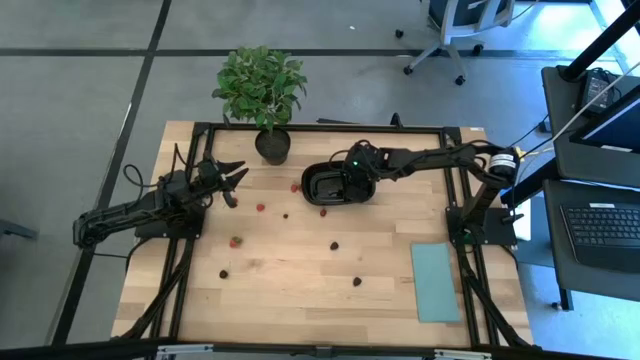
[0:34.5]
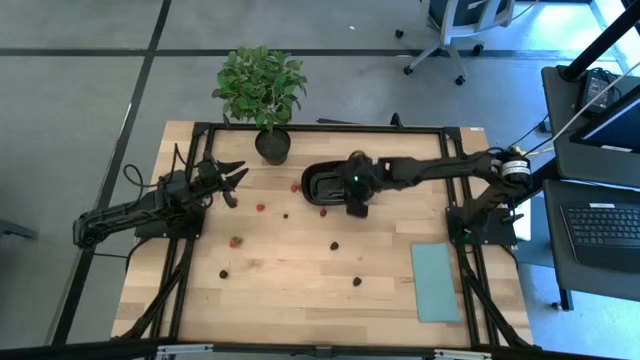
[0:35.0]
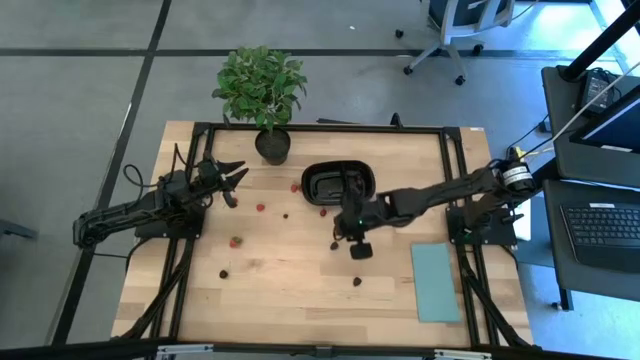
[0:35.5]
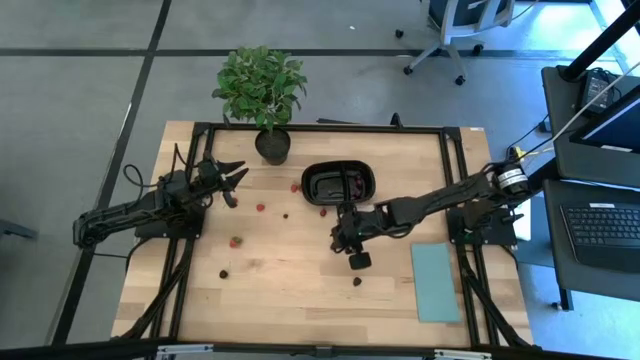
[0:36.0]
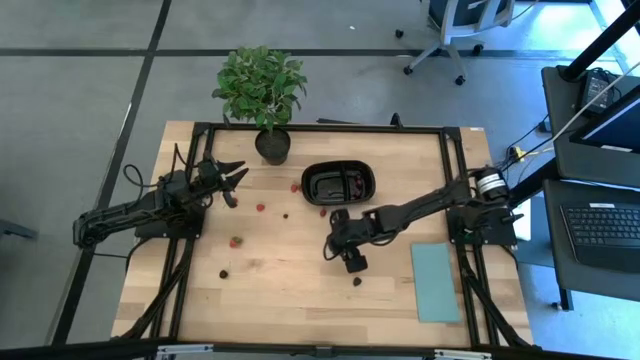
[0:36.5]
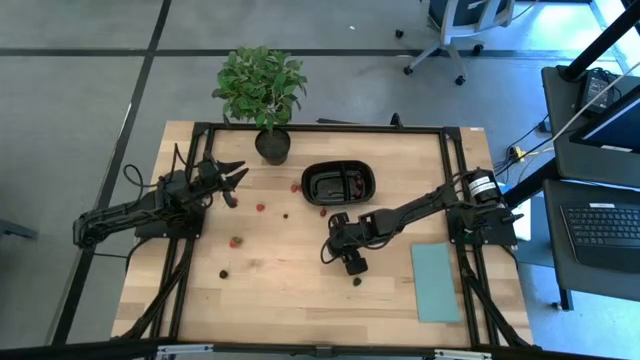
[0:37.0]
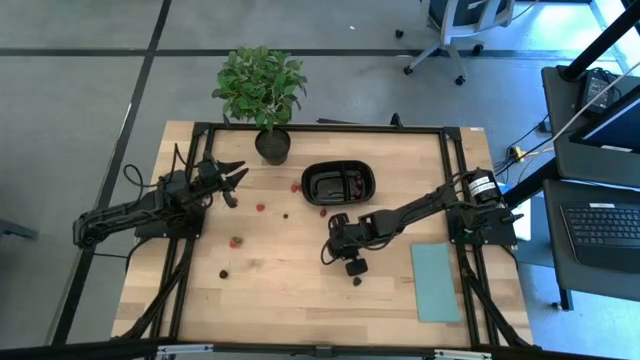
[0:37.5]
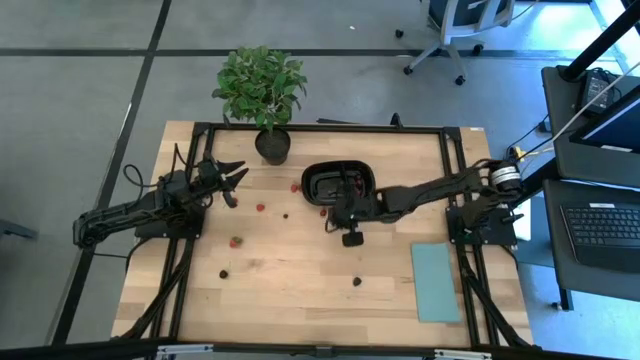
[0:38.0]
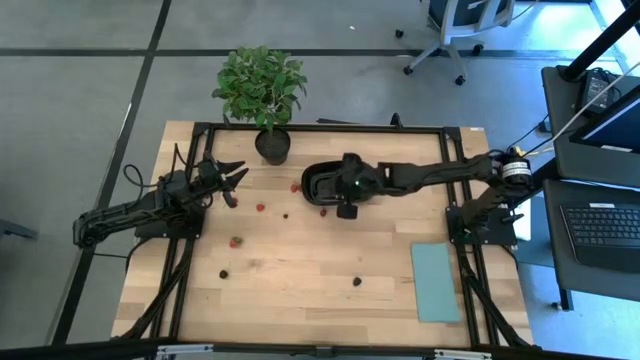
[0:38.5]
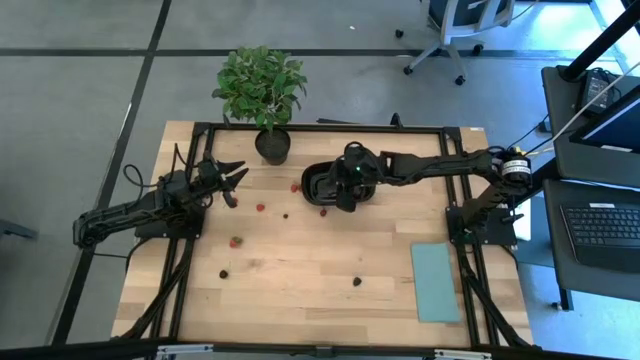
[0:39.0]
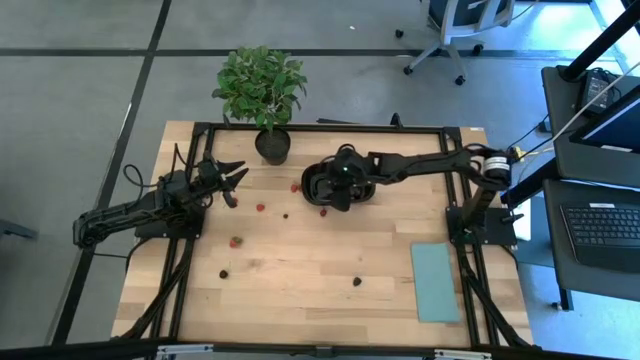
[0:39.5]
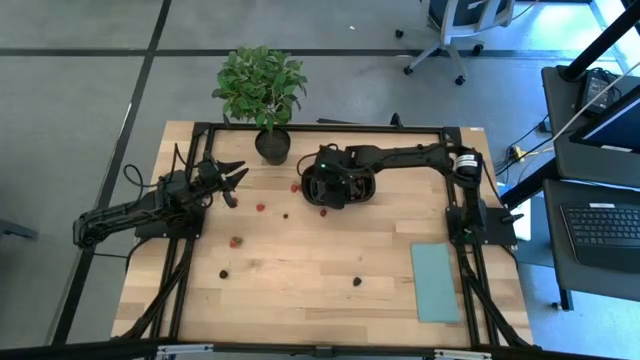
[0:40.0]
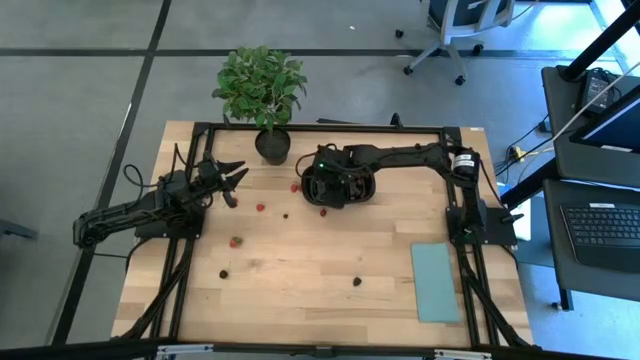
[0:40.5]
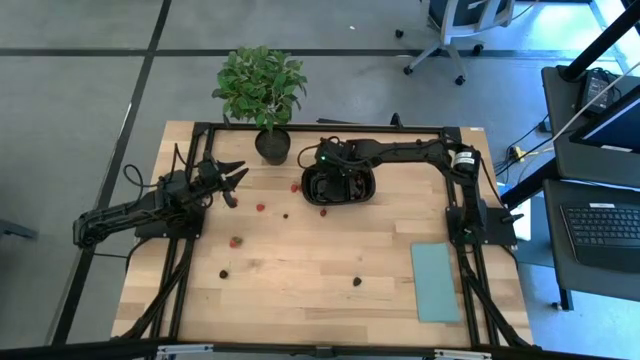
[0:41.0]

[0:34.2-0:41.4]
Task: Pick and placing Produce into tupperware
Put the top blackberry into the black container

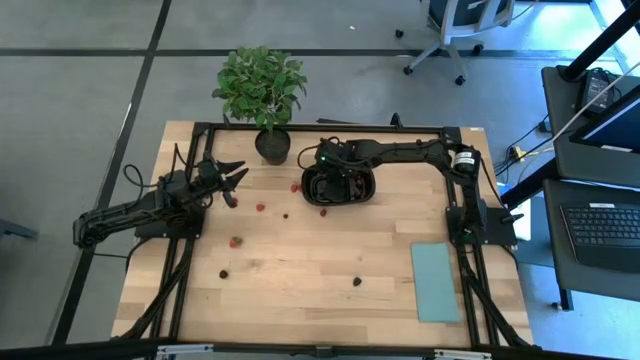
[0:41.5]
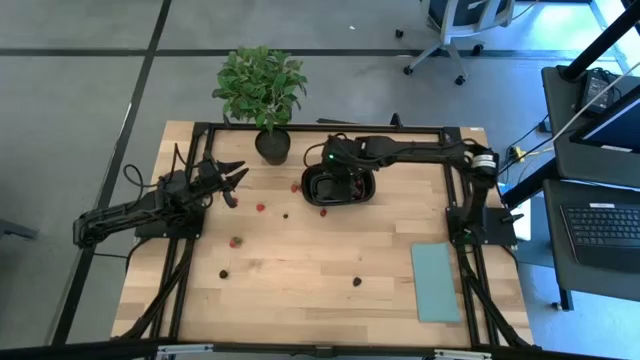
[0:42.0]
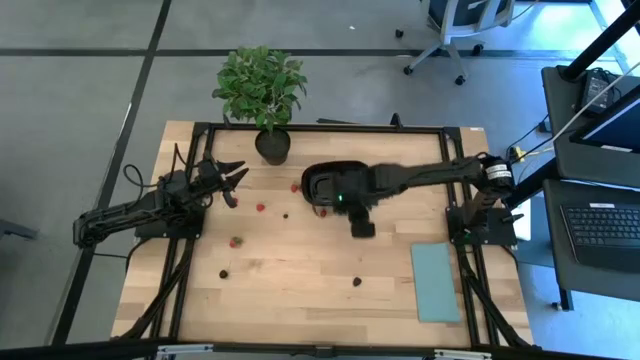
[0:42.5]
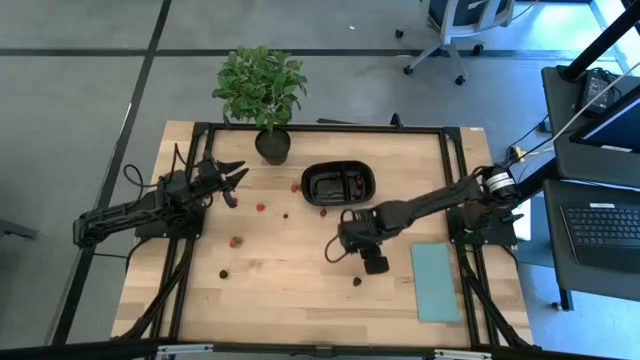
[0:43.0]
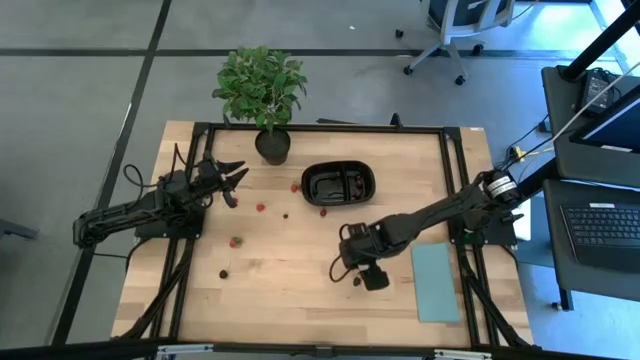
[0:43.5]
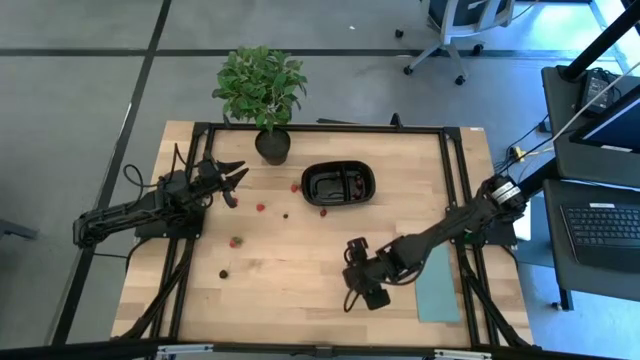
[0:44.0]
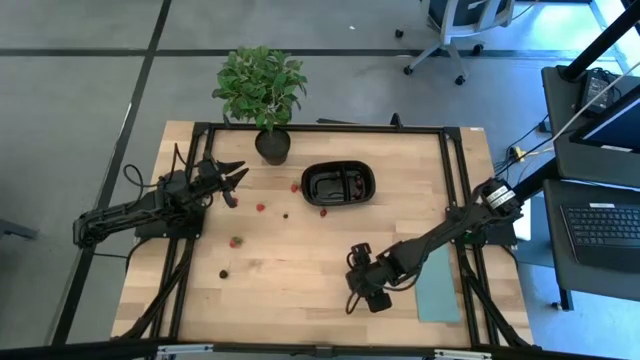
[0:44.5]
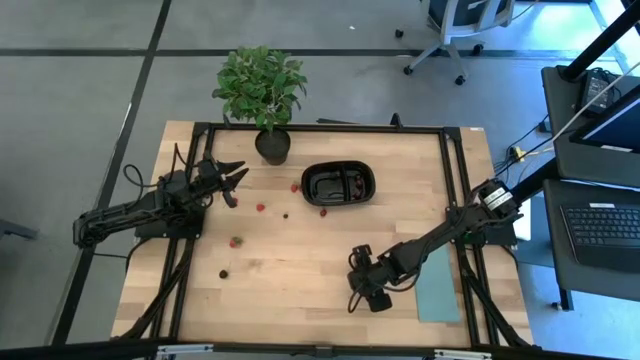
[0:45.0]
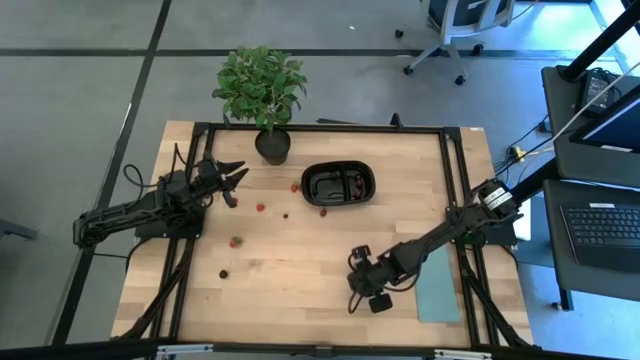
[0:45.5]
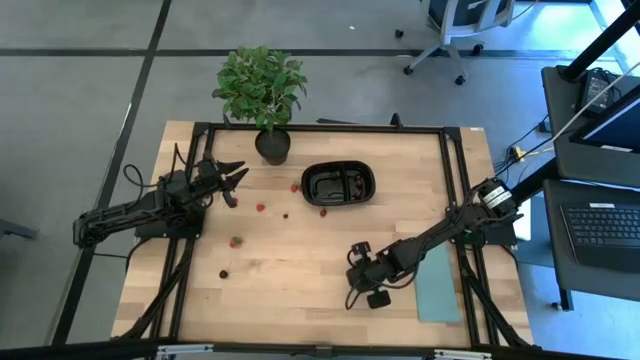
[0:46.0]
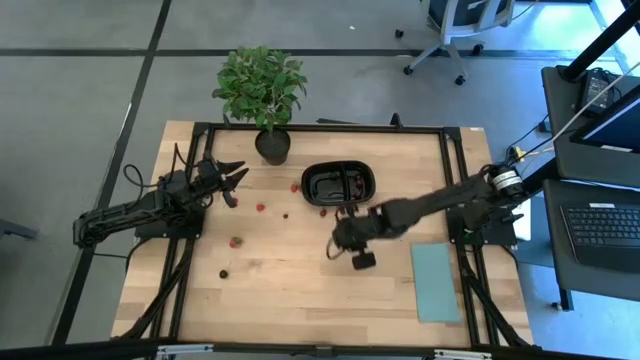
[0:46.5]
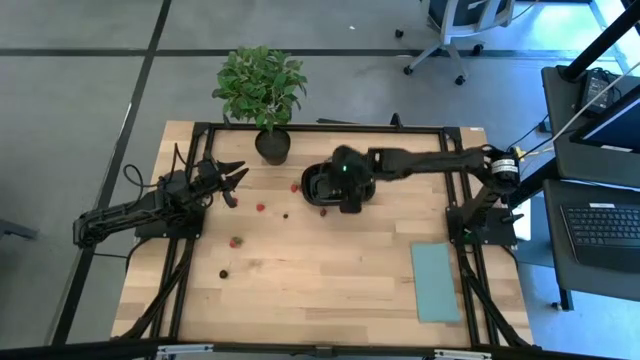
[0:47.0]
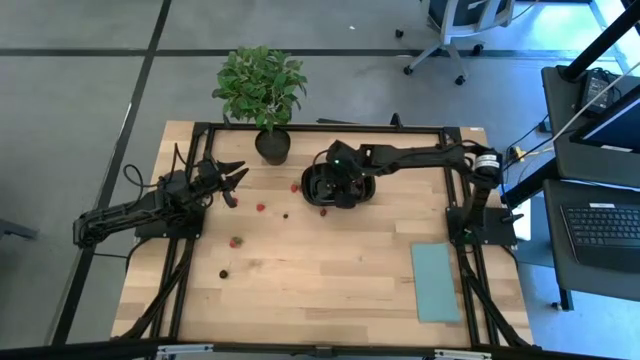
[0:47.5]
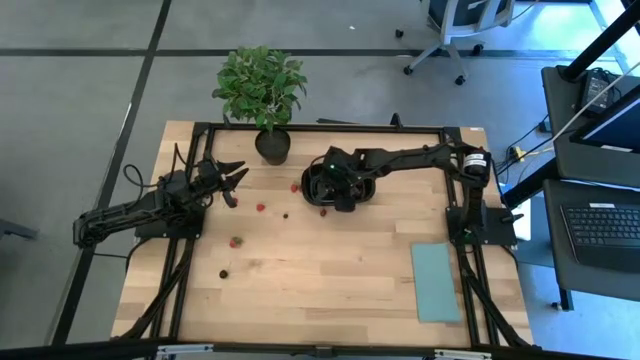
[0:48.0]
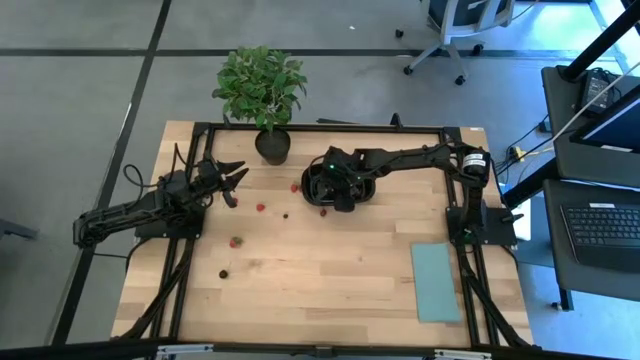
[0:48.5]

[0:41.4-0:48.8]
Put the blackberry into the black container

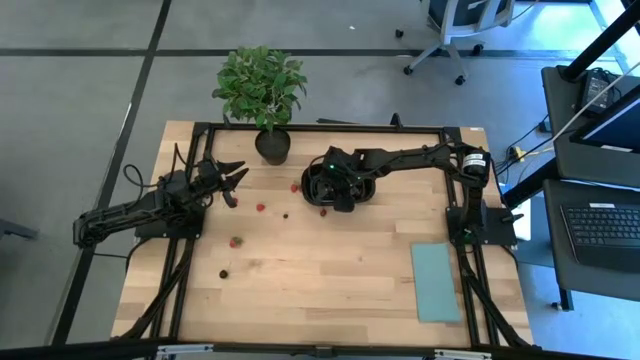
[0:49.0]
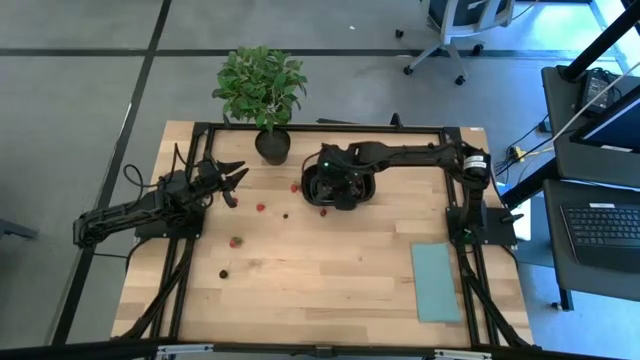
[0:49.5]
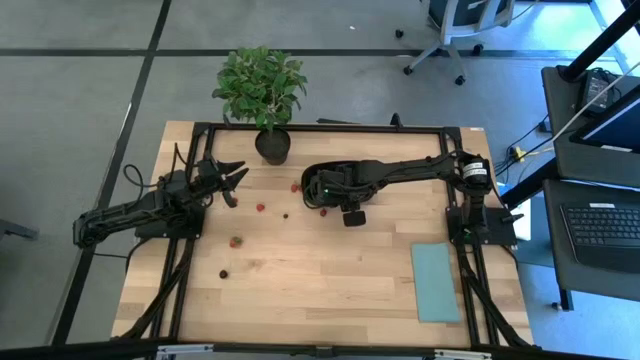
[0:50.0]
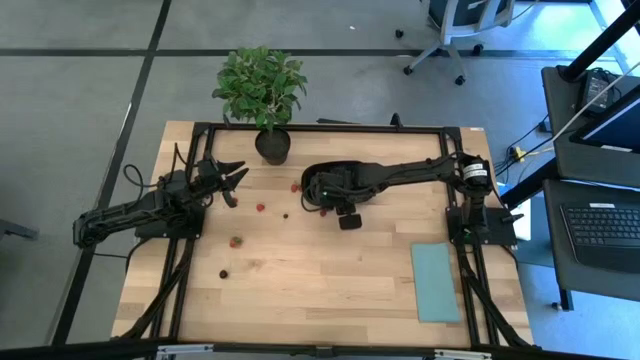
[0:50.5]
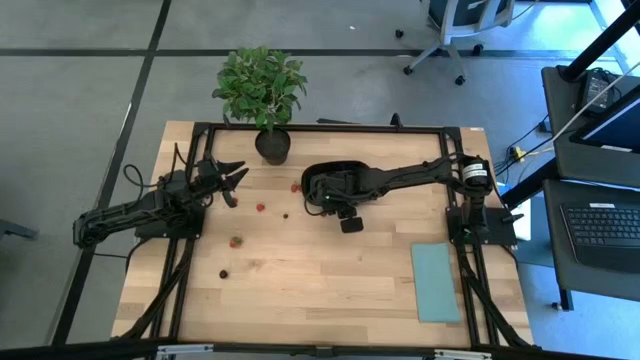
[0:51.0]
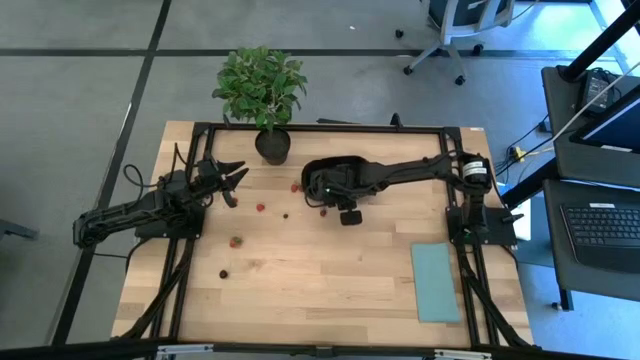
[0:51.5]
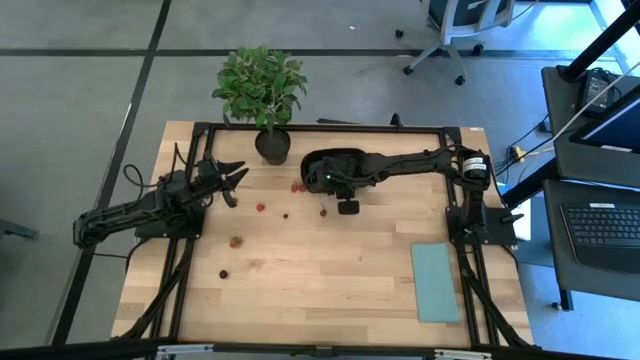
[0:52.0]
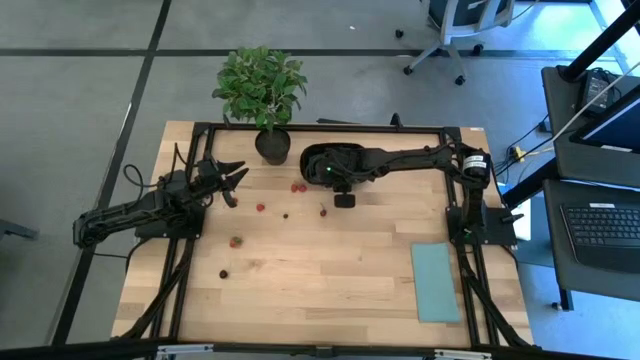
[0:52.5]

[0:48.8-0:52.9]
Move the black container to the top of the table

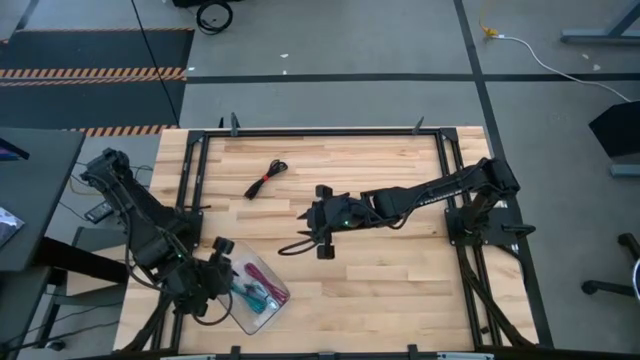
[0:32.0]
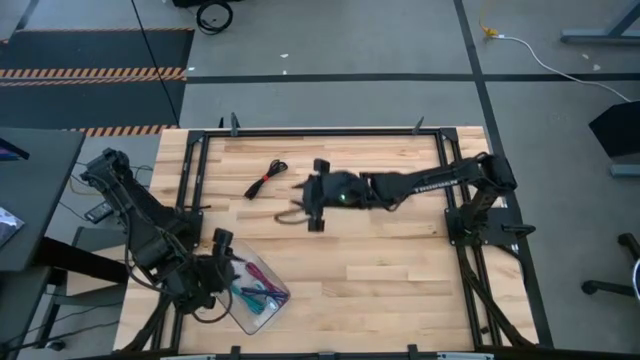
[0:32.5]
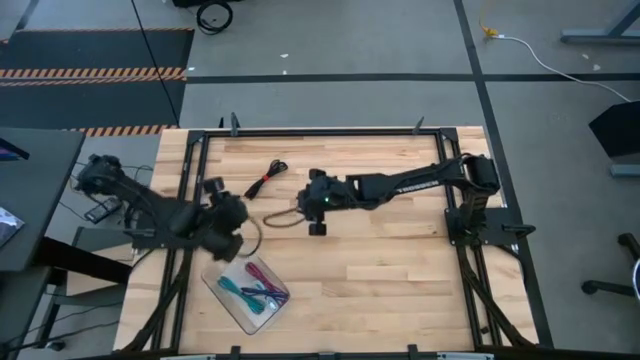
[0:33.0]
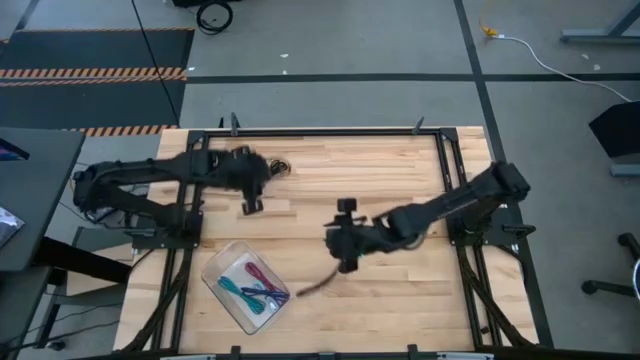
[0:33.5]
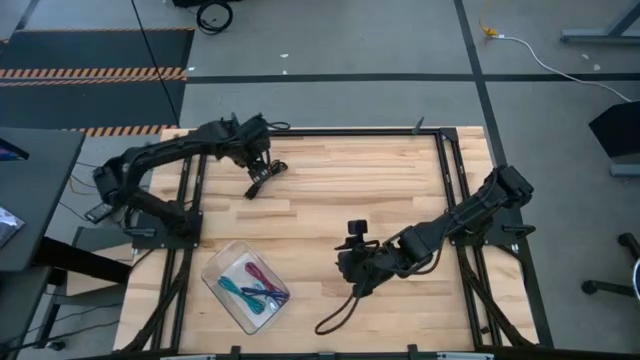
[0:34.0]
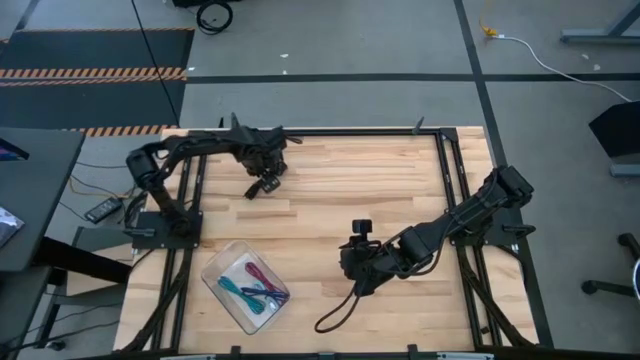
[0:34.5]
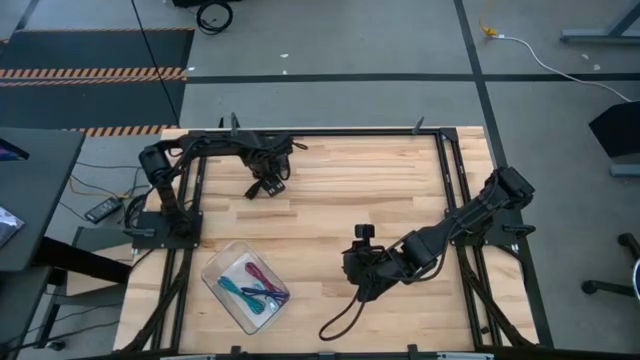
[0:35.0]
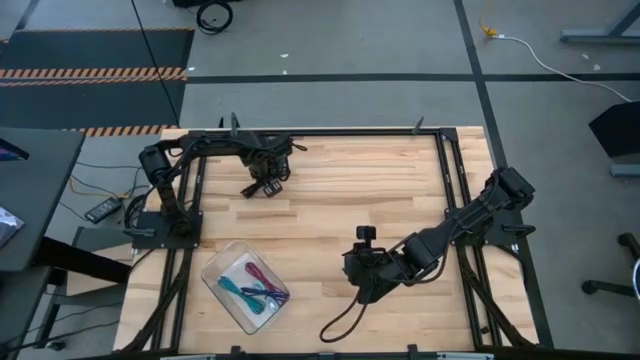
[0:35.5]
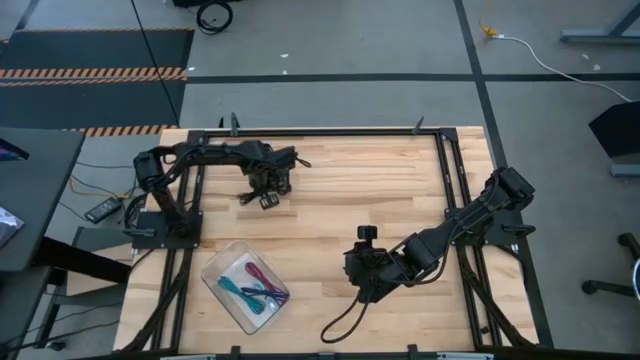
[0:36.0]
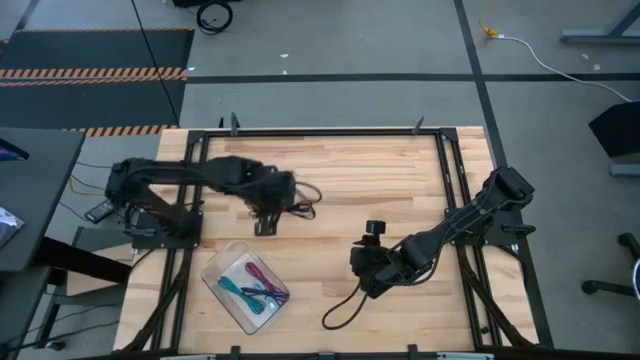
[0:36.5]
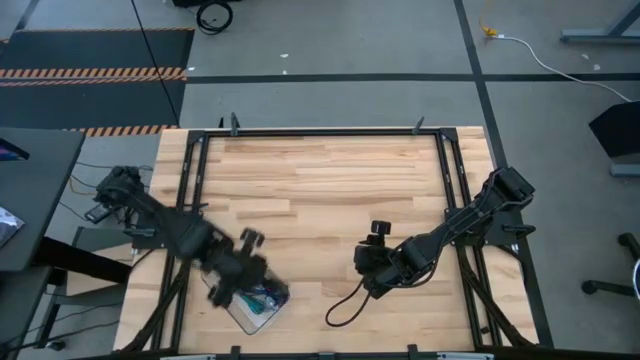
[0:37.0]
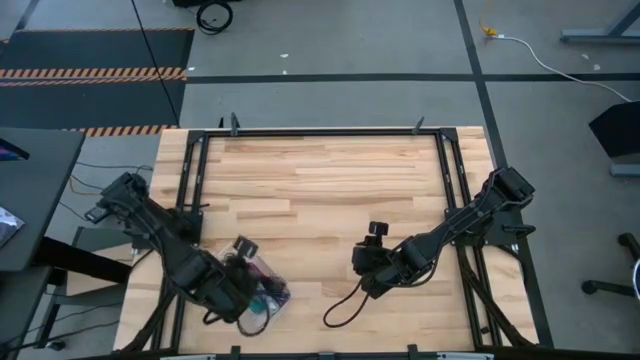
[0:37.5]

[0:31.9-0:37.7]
Task: Pick and place USB-C Cables
Put the black charger cable into the transparent bin
